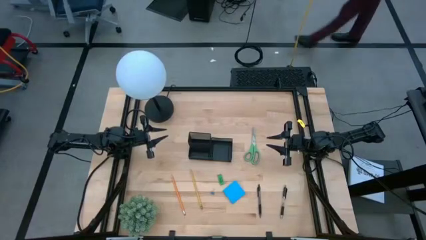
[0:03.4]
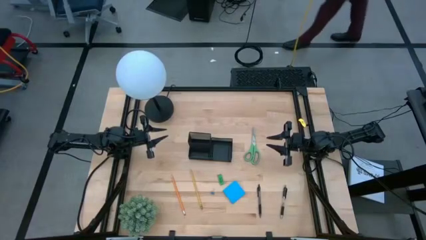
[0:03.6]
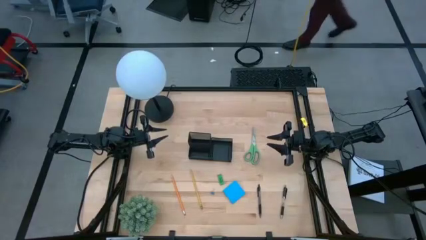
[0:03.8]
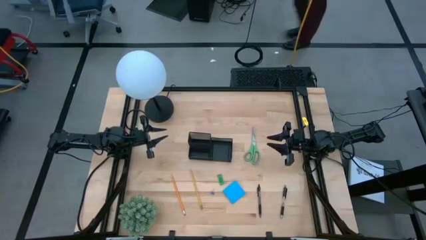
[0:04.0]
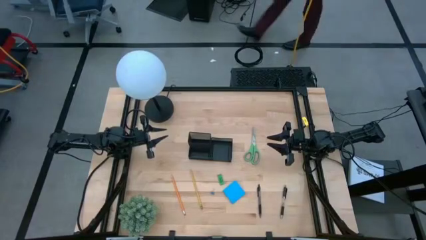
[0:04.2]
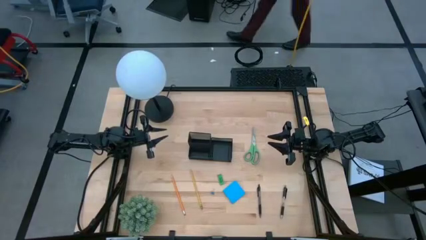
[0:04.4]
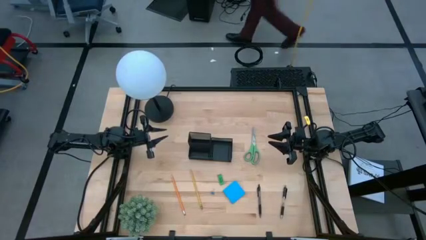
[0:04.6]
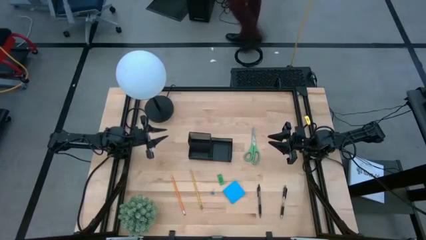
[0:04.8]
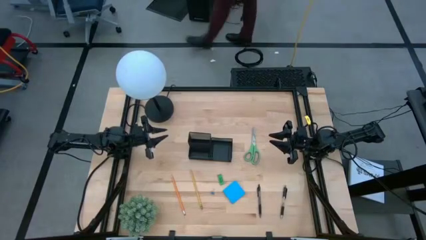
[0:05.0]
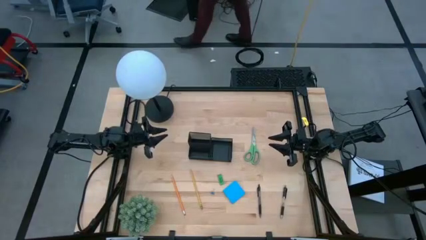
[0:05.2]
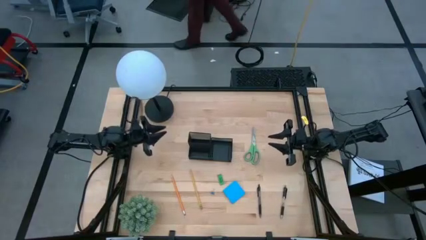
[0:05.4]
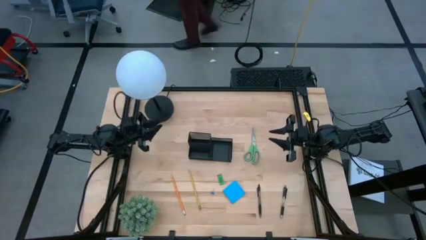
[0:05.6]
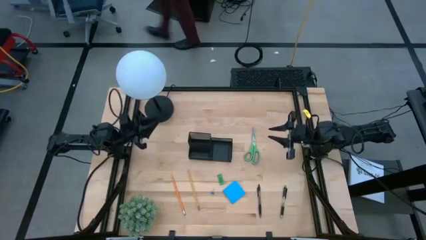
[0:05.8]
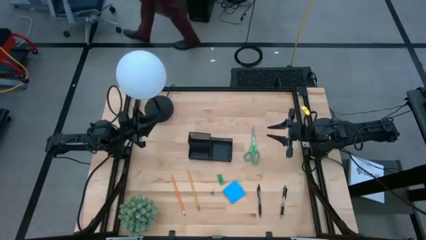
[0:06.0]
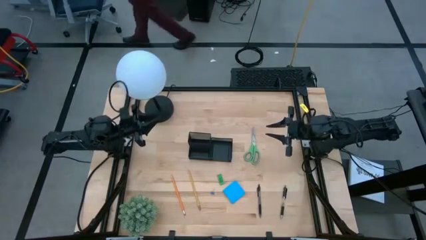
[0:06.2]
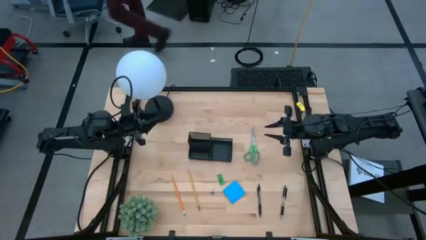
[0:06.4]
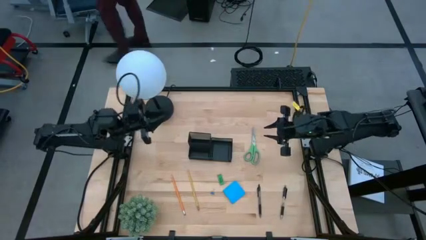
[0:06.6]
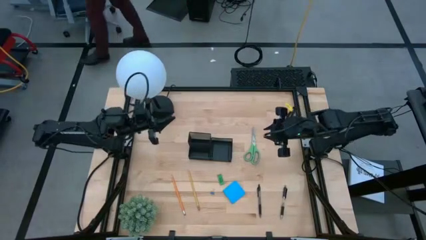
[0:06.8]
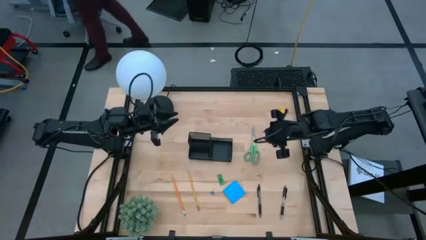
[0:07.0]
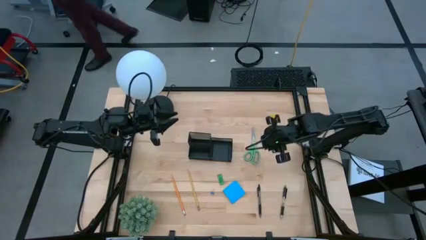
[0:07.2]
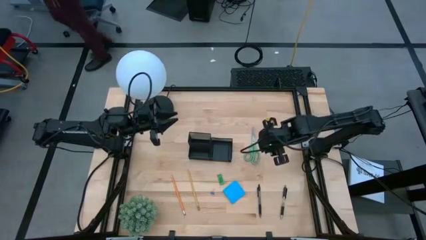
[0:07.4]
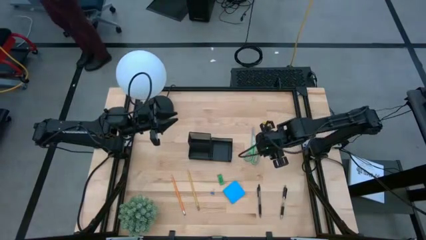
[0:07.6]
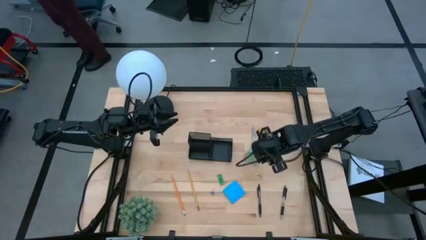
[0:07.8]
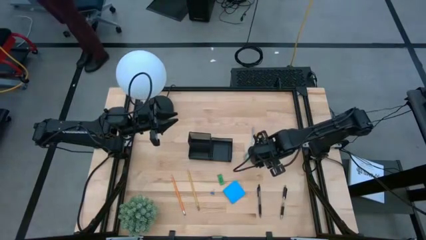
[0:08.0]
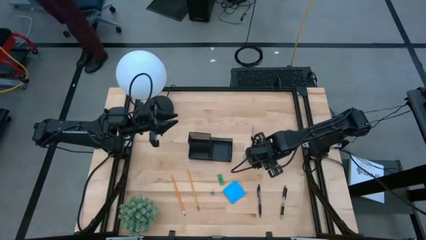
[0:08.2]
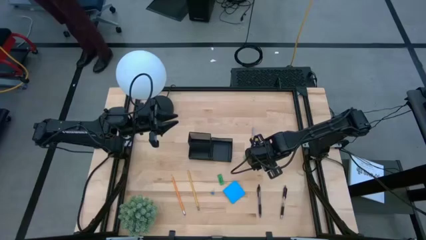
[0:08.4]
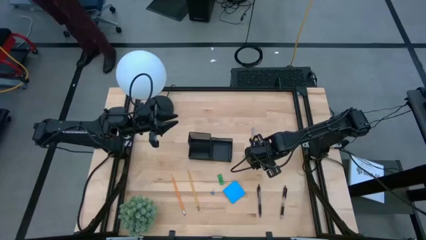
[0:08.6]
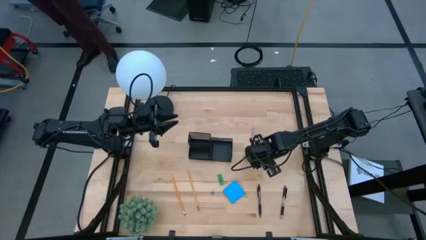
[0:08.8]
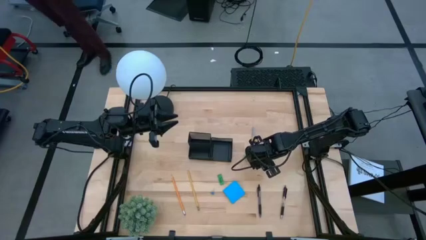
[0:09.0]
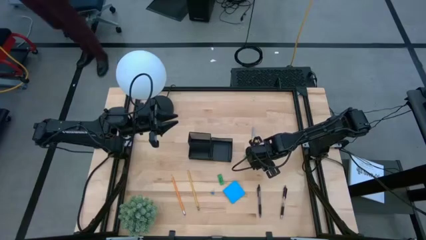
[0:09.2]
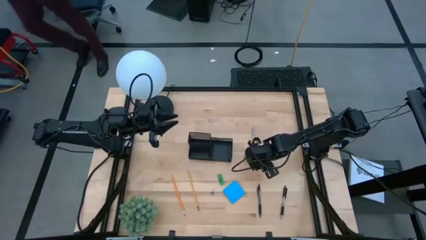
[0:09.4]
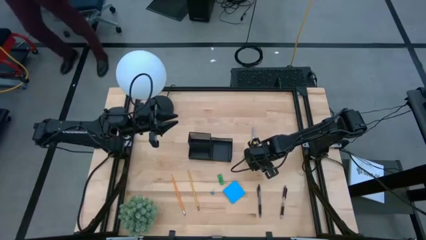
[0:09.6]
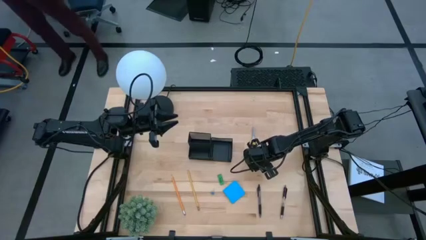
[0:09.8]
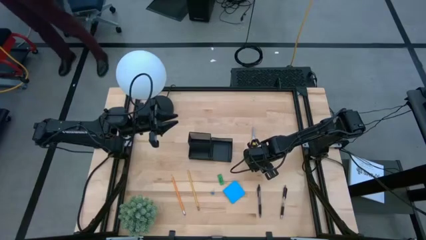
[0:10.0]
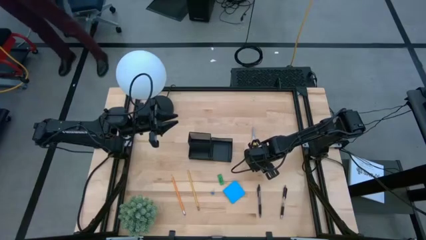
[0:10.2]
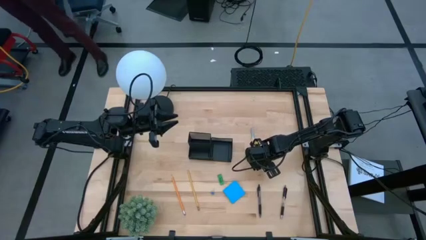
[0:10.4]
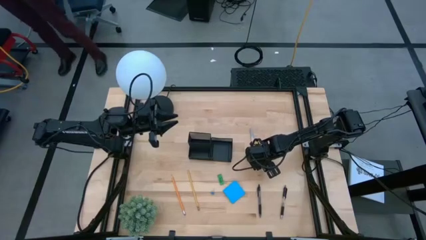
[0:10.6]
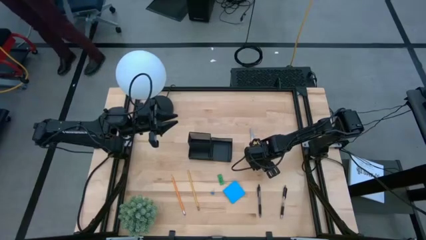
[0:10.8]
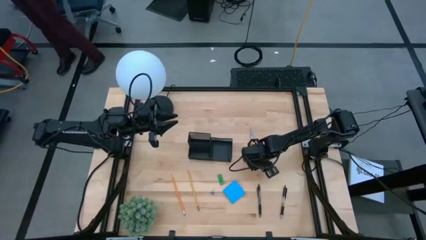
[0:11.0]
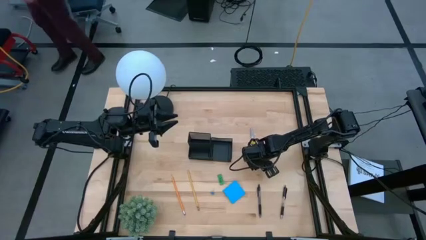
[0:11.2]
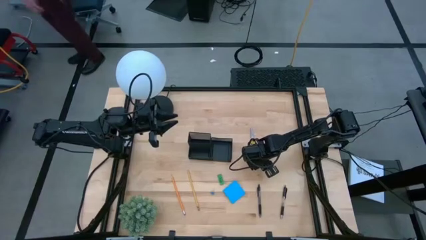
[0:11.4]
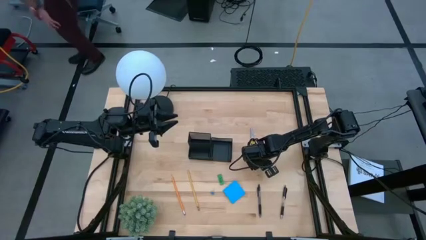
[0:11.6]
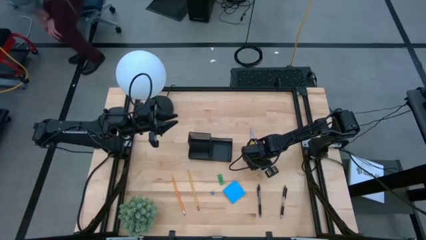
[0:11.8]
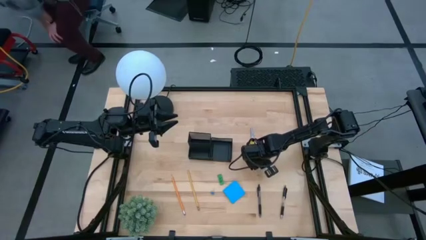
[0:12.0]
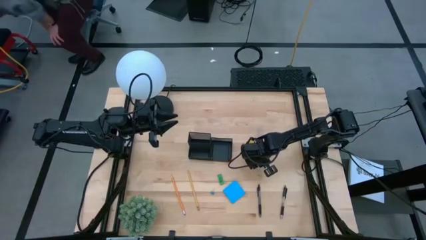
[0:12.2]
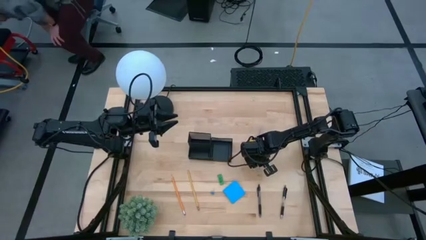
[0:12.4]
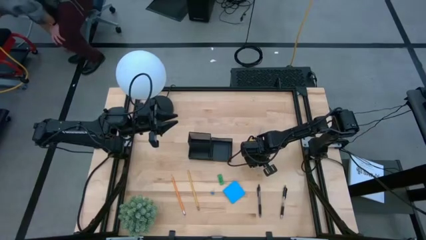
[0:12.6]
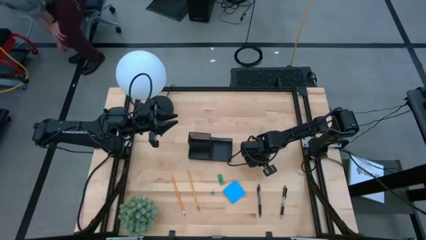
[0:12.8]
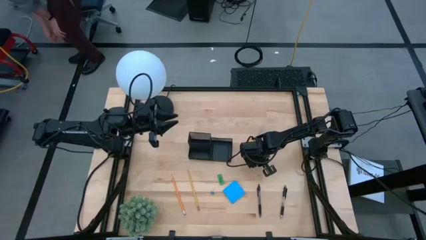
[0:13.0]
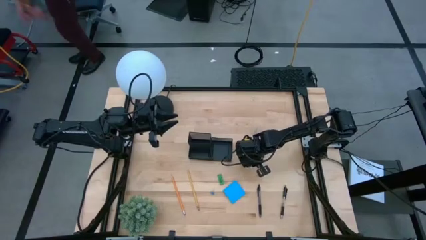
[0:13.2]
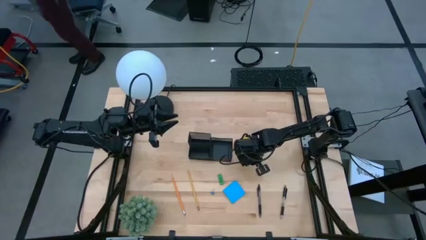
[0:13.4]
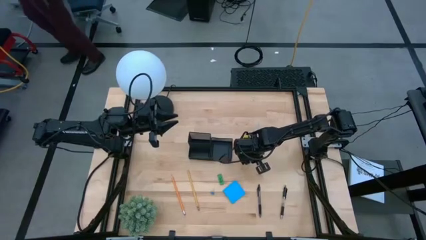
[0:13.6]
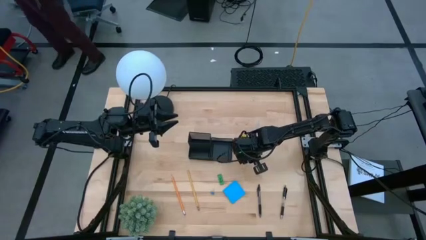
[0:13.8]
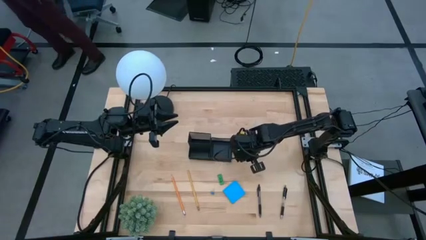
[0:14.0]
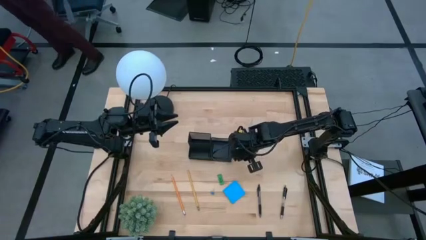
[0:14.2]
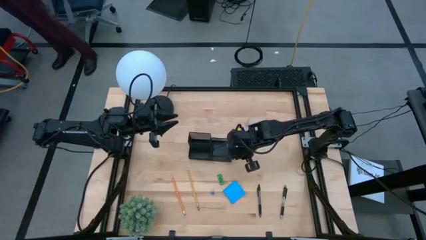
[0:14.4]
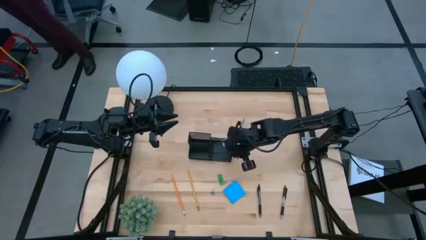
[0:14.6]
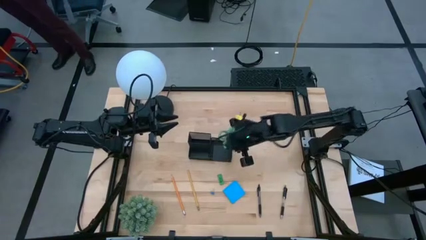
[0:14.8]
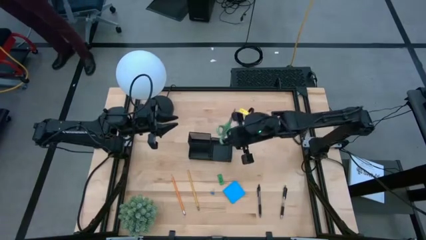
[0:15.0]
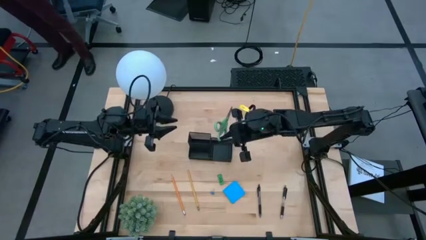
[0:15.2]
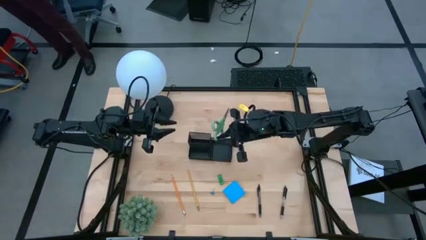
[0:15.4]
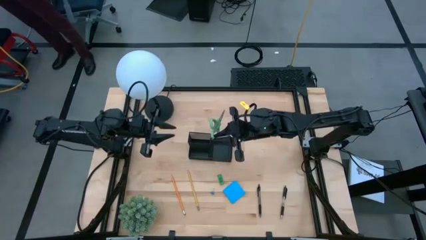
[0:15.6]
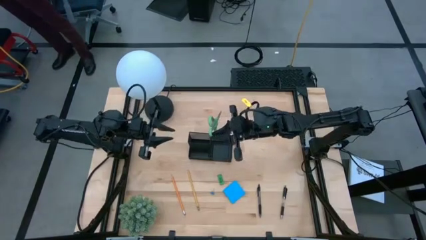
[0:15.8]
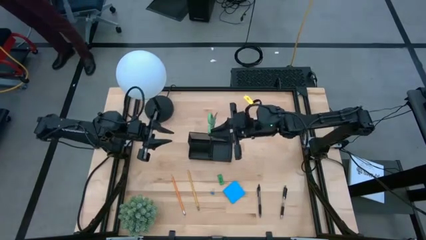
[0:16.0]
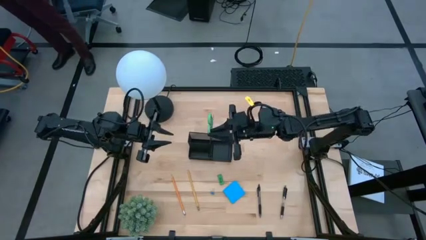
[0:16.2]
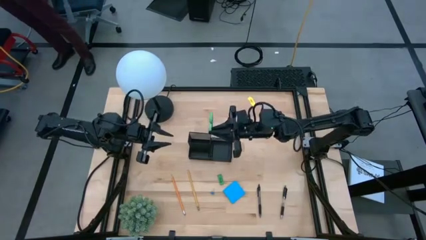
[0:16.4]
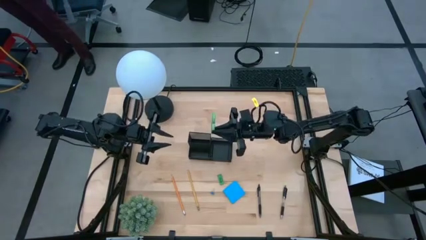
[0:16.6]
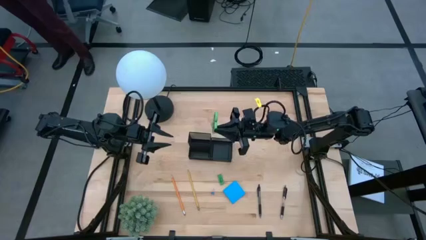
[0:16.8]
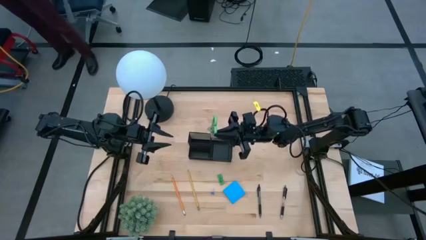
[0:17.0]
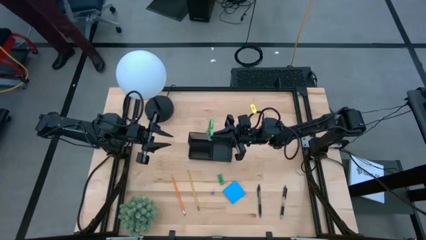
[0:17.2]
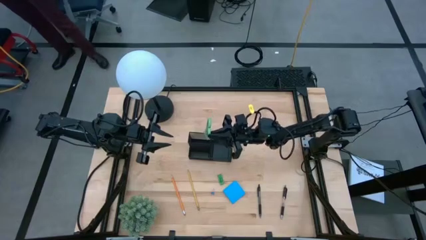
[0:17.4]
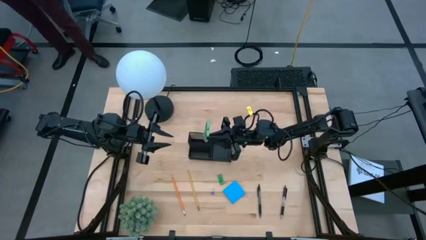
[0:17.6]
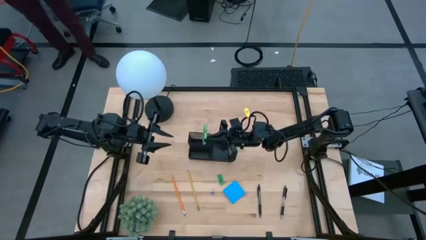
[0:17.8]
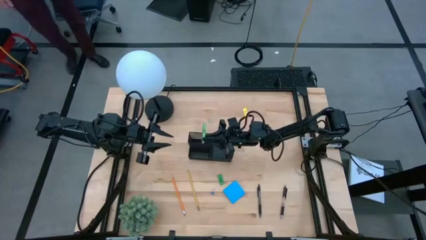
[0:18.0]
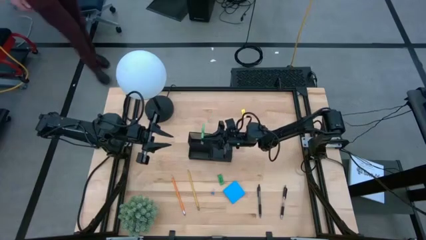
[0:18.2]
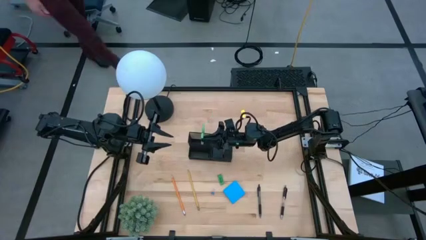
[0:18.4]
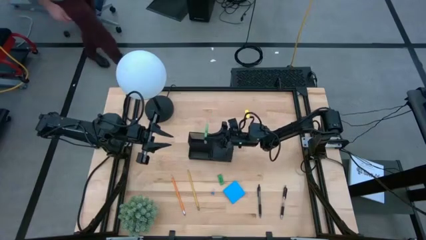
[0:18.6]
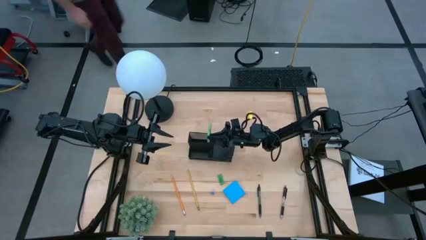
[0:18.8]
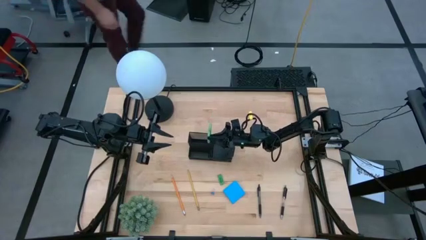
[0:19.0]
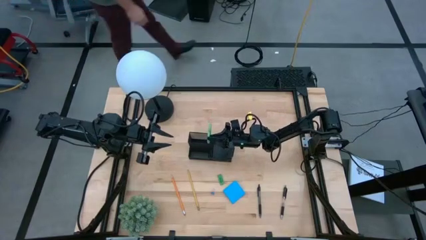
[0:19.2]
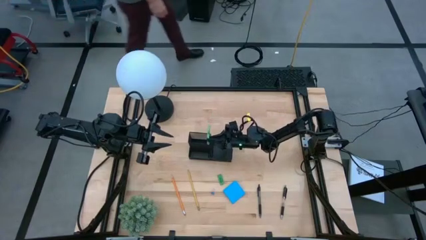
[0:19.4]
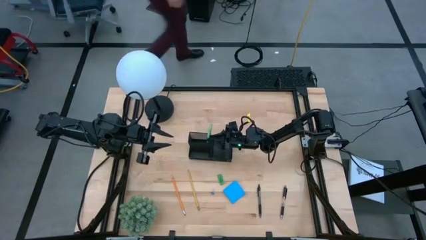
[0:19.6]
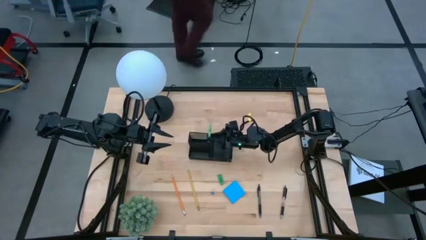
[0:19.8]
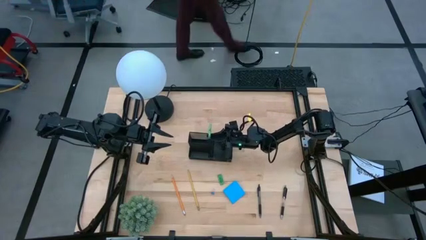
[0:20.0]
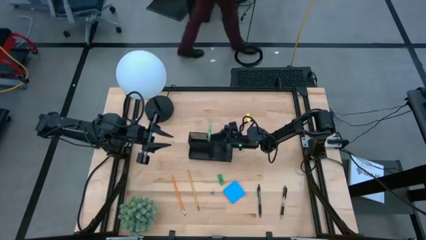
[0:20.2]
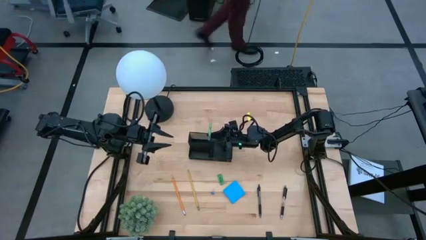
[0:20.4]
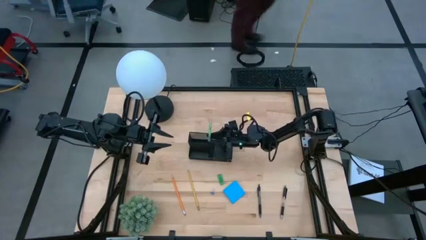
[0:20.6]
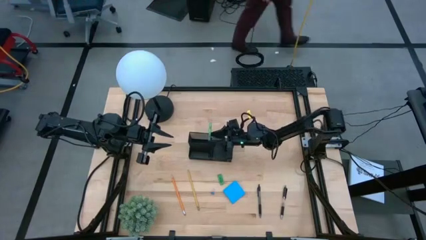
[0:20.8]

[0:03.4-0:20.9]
Task: Pick and place office supplies into organizer
Put the green scissors into the black desk organizer
